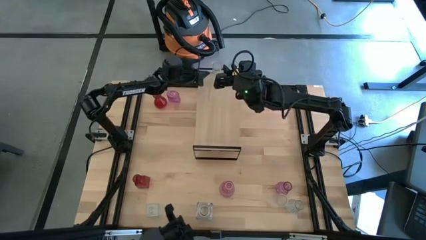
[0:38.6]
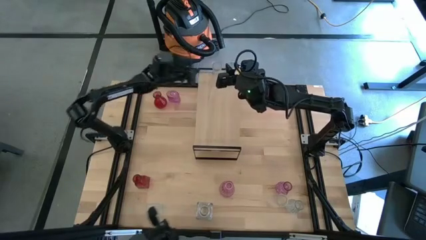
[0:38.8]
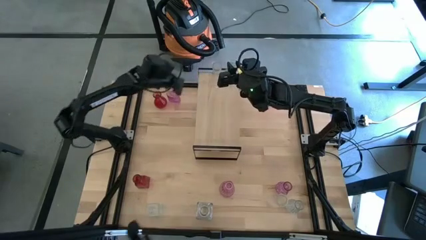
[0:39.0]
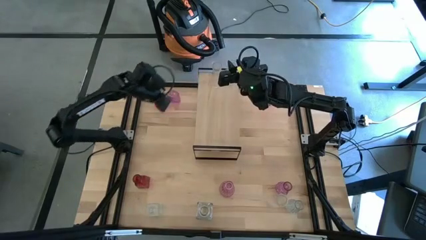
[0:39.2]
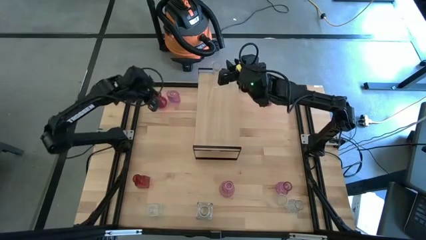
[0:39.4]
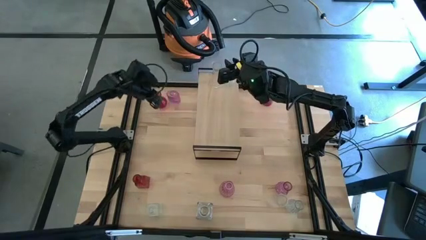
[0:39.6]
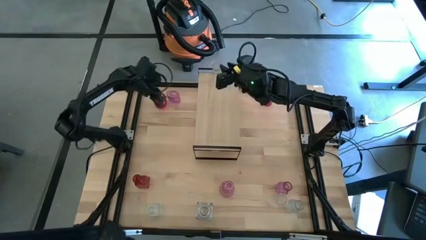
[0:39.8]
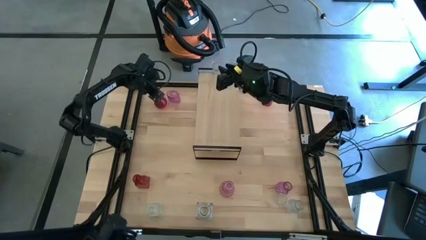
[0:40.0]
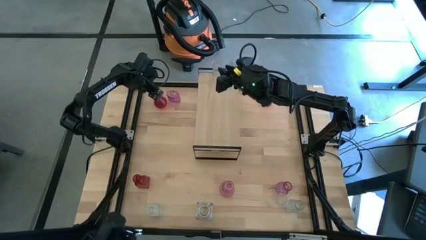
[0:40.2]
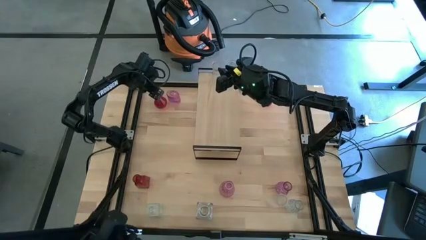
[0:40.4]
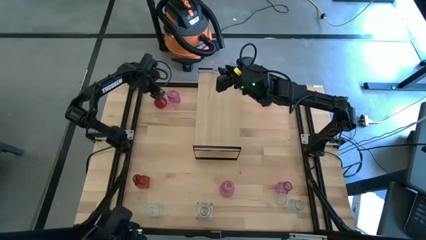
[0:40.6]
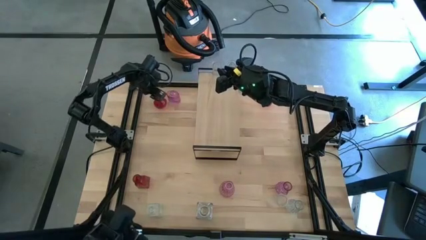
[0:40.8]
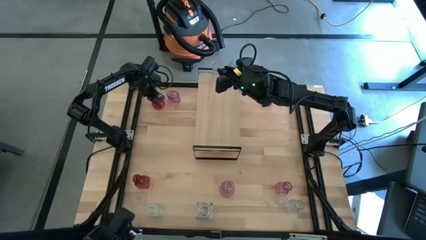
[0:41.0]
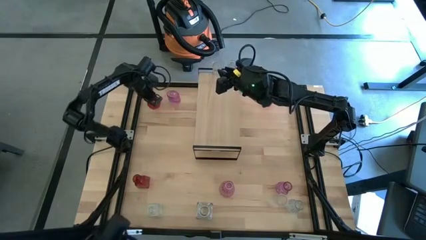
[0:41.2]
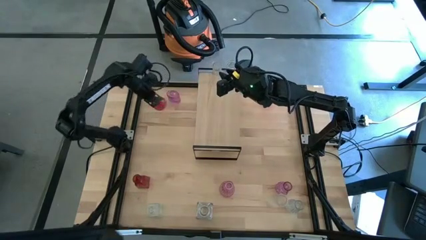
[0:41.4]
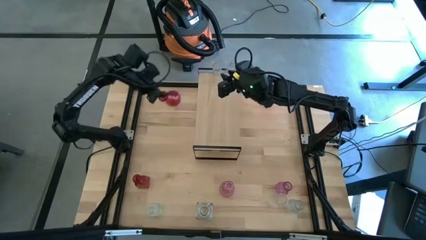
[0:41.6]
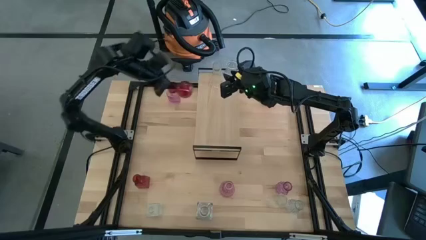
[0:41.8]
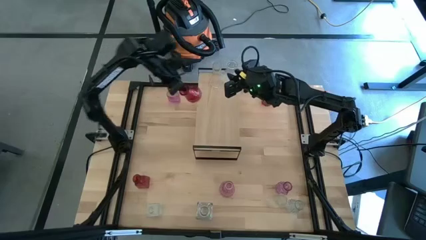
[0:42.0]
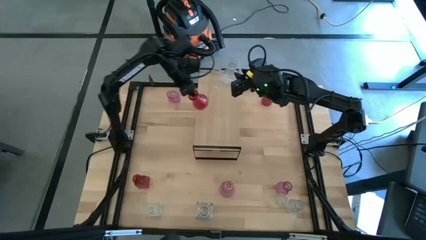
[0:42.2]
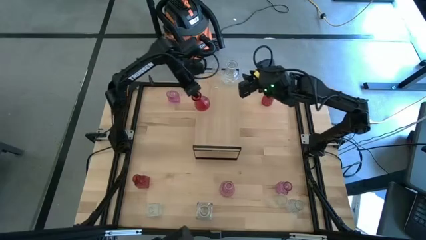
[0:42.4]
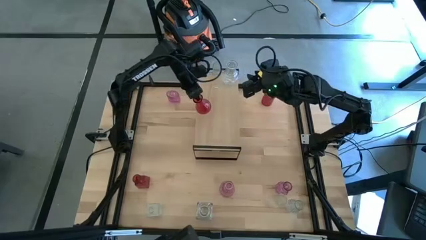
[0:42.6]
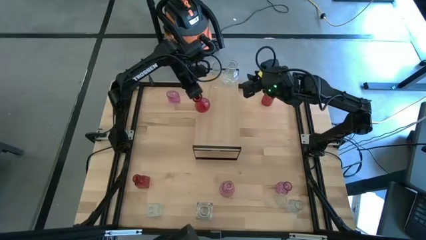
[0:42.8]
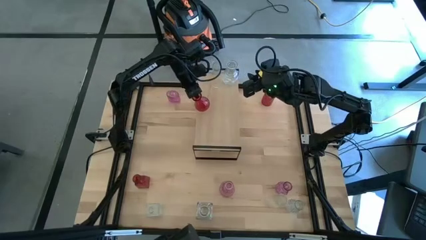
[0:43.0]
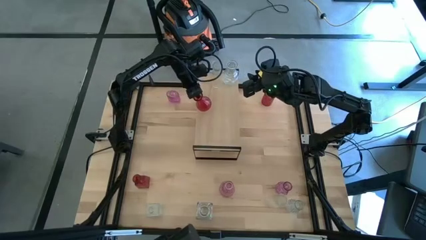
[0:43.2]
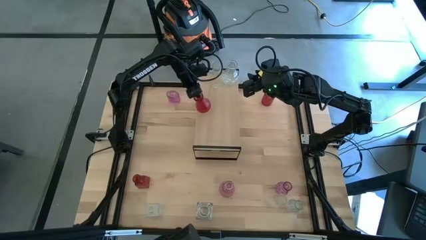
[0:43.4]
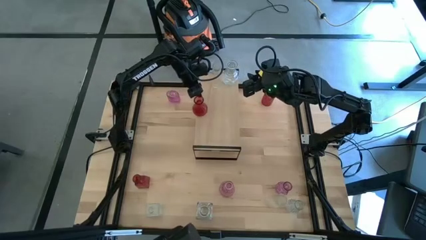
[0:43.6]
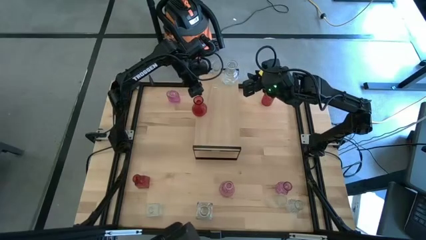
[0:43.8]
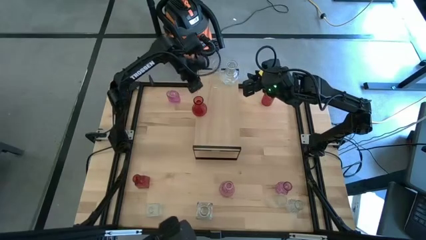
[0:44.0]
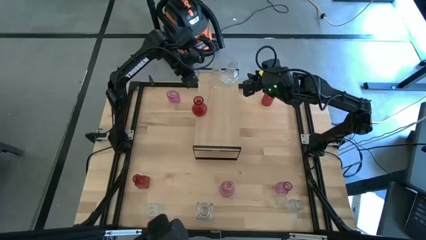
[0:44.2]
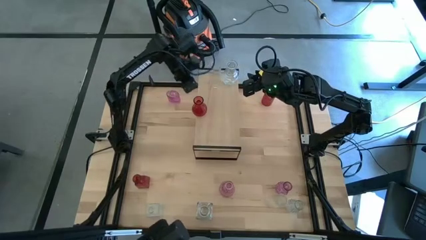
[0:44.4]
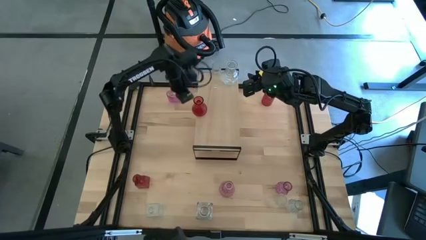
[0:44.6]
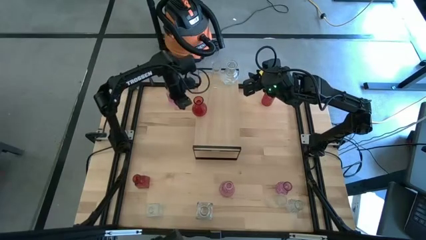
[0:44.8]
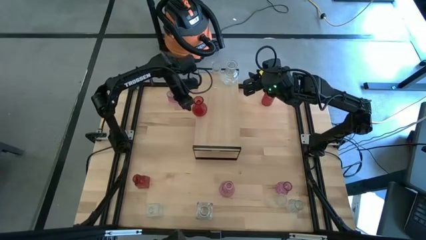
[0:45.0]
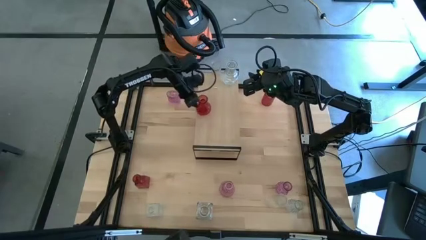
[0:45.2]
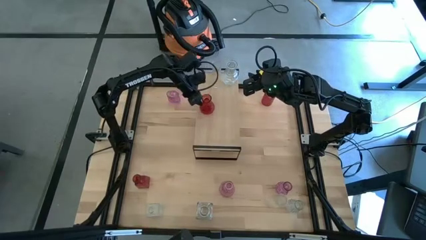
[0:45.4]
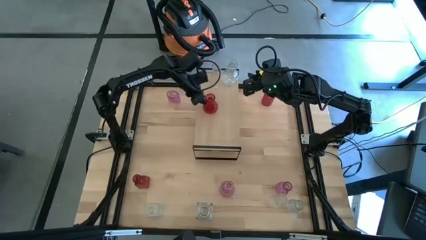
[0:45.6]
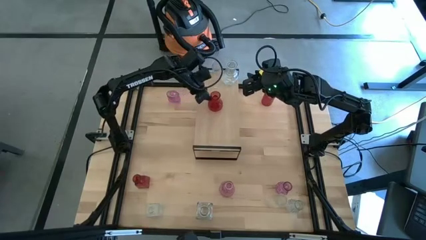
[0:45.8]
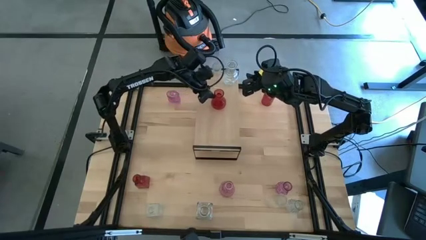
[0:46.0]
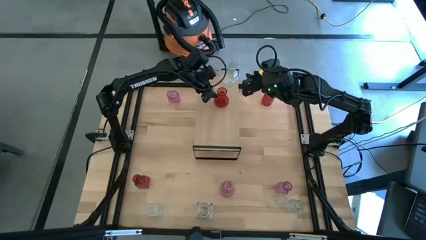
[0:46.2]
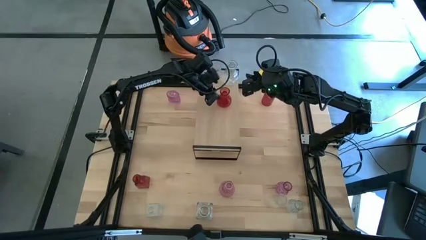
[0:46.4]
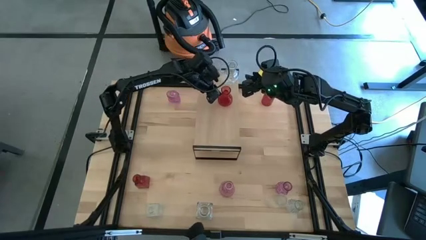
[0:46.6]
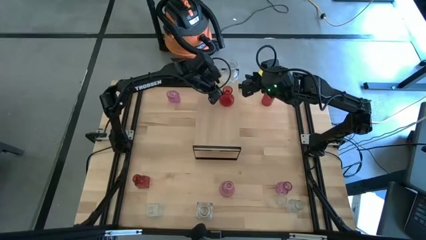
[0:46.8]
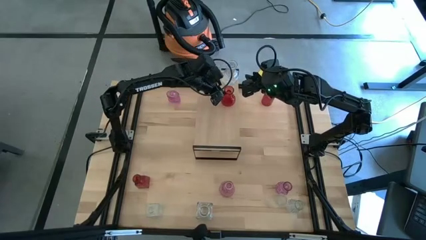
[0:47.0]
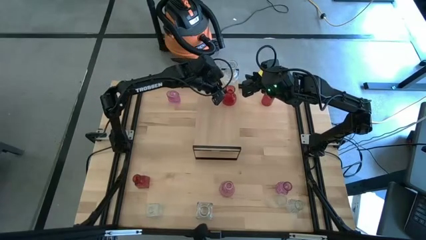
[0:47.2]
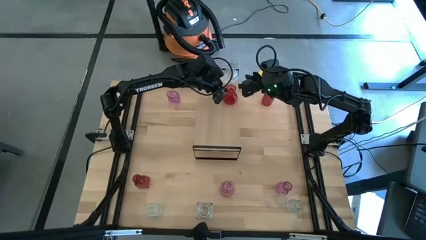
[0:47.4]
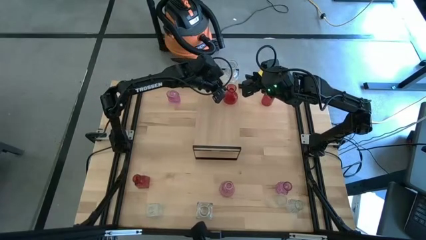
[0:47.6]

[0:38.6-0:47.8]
Task: sort vases onto shelf
Put the right red vase on the shelf

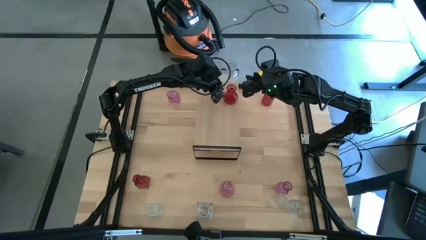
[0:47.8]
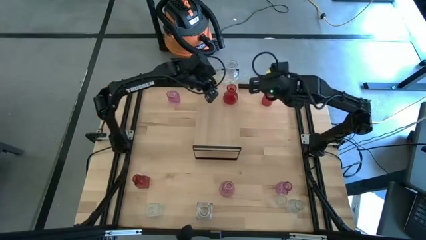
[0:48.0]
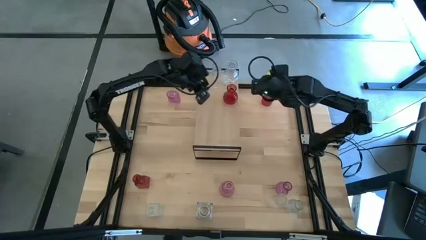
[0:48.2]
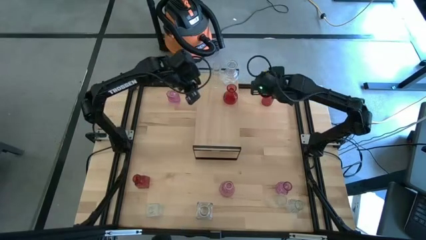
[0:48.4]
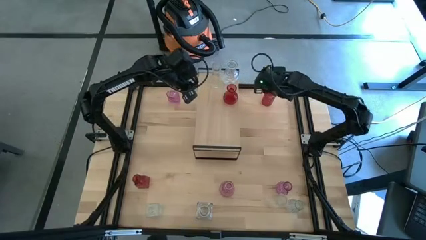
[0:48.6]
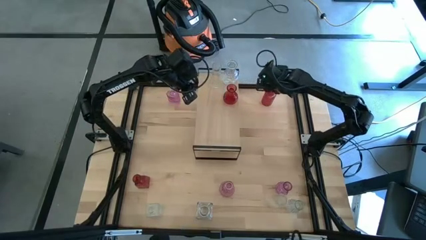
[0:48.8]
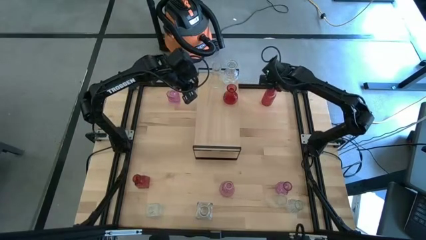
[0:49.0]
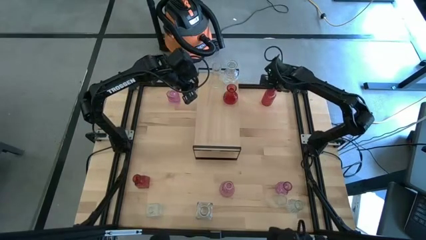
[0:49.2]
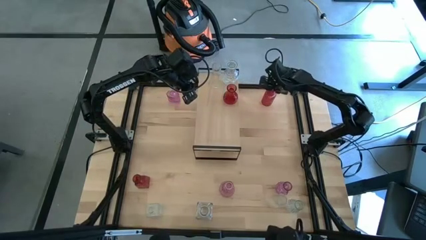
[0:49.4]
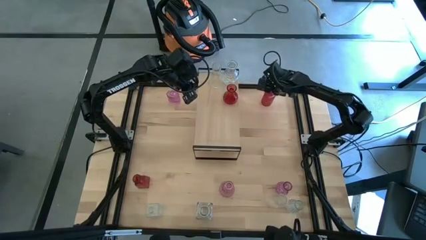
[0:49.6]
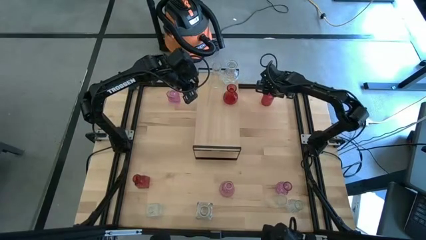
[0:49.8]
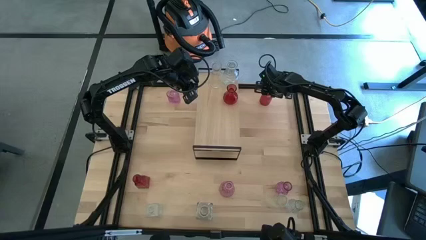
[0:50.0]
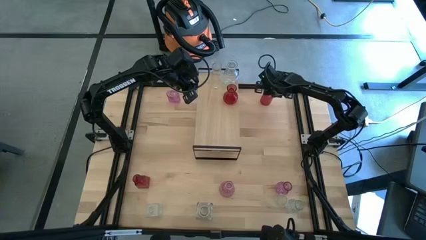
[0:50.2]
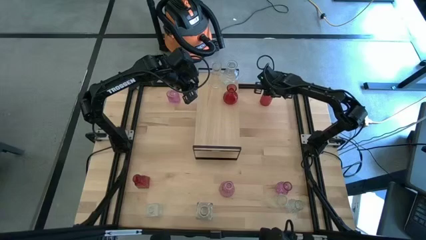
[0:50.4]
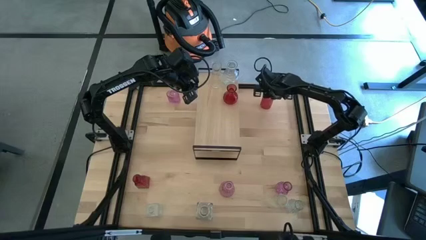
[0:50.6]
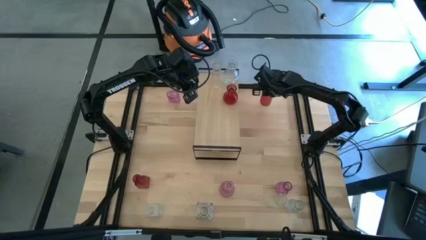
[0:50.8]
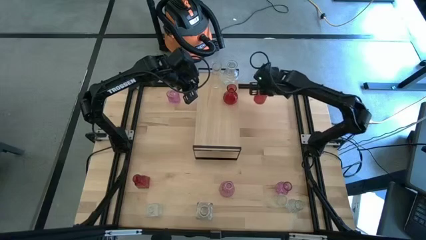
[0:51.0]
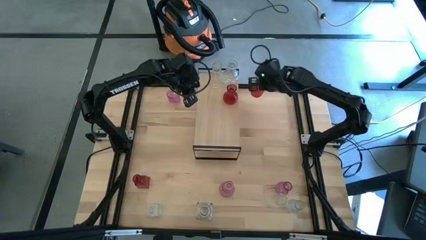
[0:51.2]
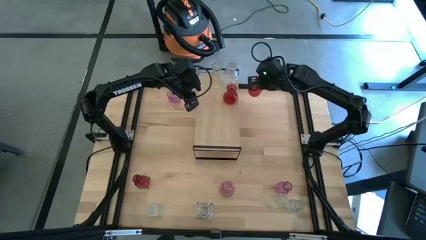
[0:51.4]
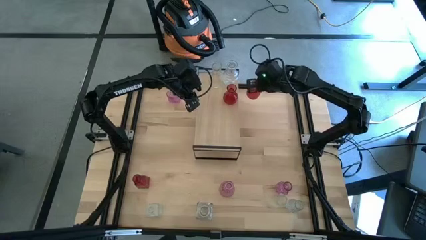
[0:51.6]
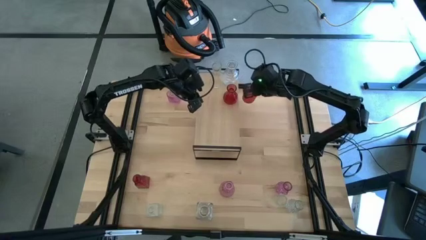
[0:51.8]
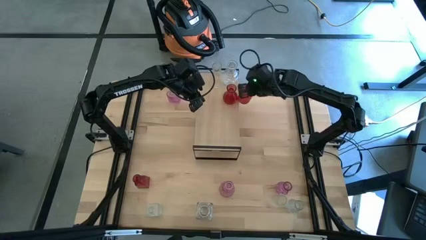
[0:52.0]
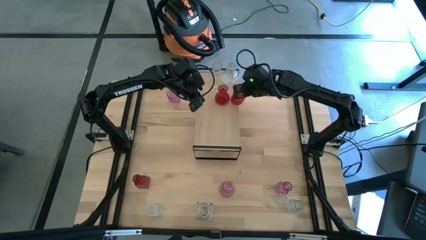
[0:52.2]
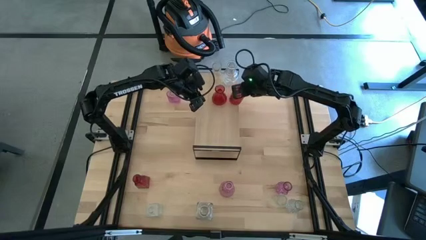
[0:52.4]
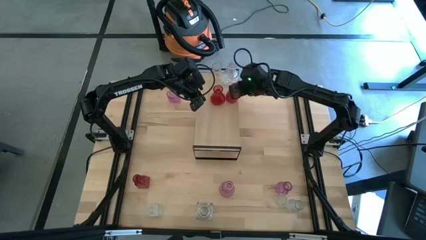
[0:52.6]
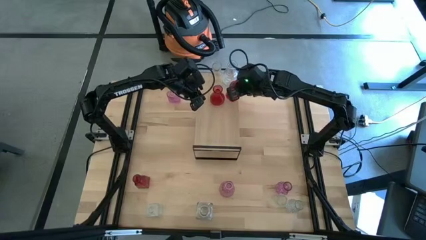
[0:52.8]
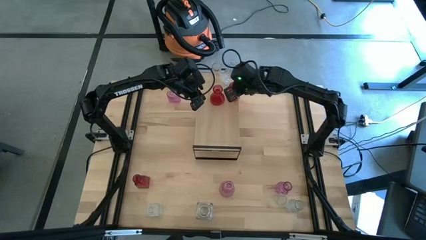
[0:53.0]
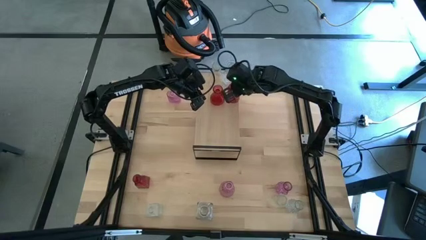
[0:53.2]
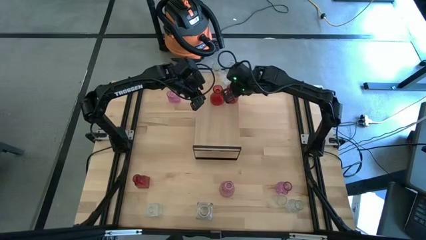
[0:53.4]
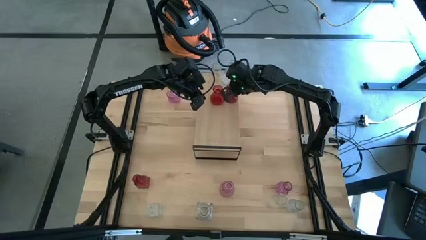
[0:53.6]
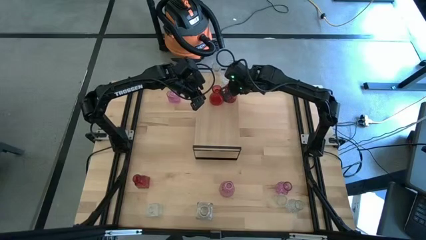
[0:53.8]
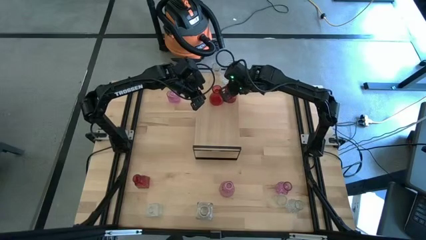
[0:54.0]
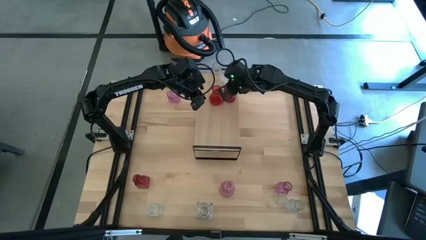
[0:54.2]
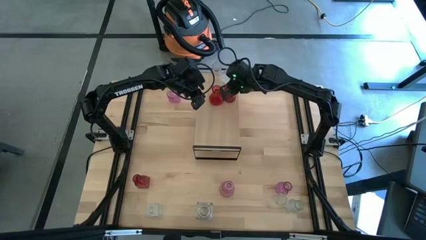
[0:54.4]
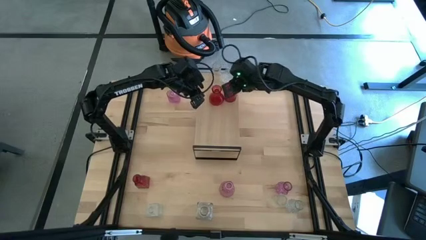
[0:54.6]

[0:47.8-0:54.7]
Put the red vase on the shelf aligned with the other red vase
